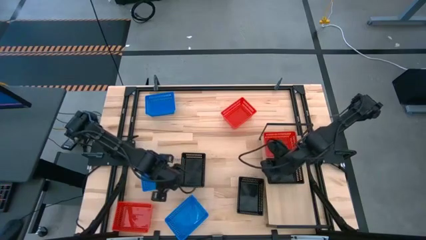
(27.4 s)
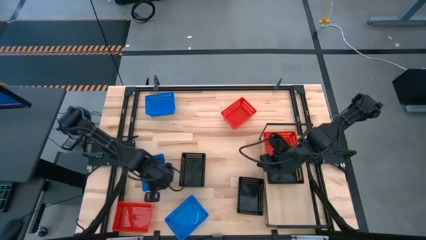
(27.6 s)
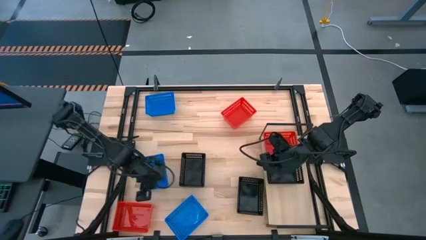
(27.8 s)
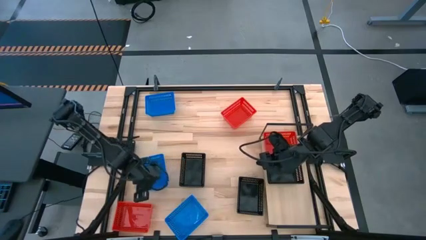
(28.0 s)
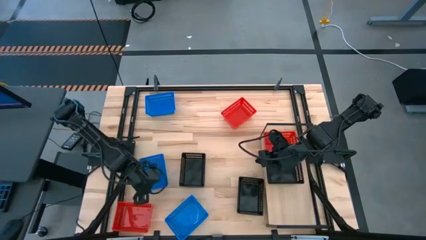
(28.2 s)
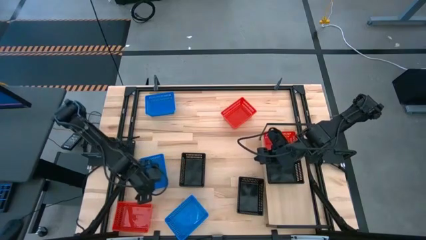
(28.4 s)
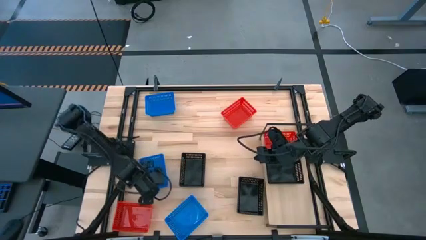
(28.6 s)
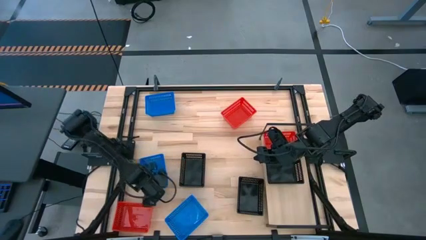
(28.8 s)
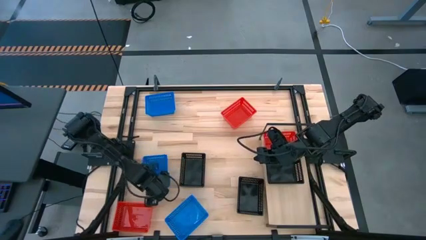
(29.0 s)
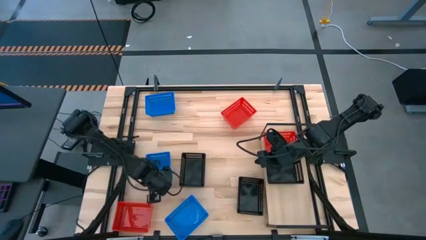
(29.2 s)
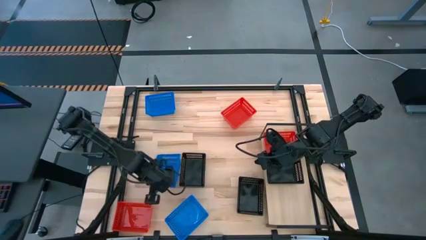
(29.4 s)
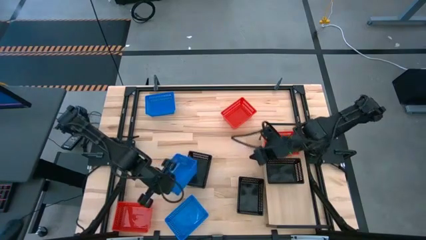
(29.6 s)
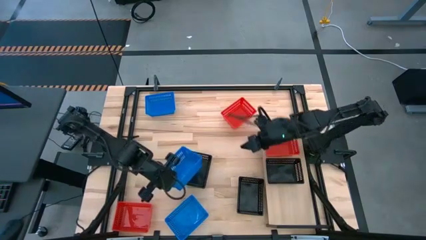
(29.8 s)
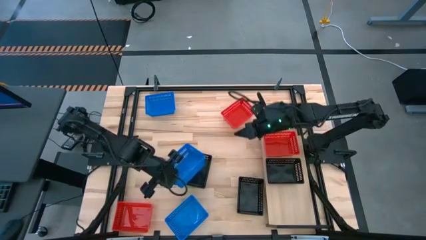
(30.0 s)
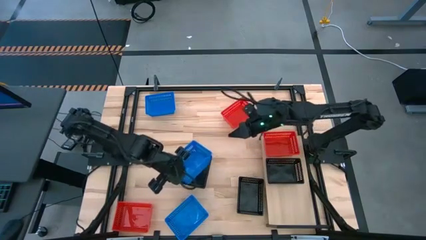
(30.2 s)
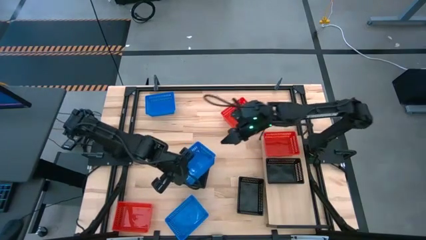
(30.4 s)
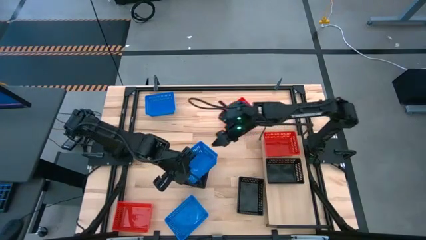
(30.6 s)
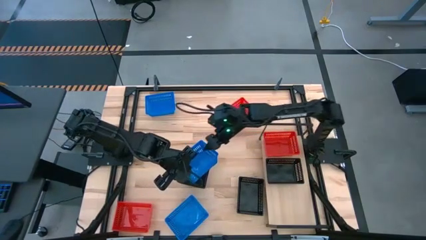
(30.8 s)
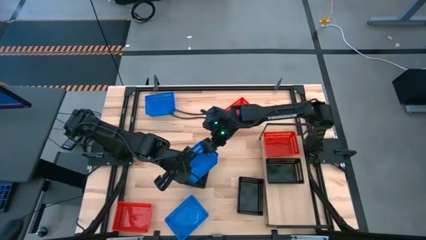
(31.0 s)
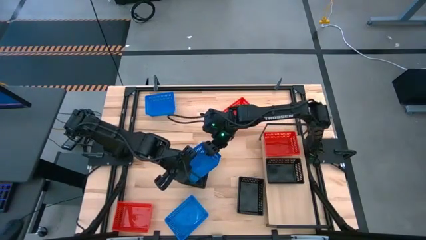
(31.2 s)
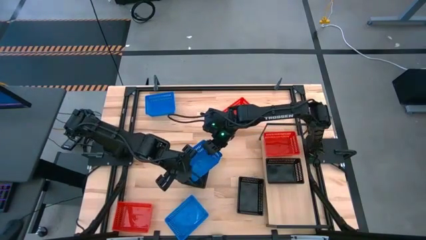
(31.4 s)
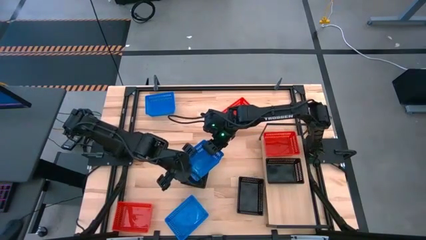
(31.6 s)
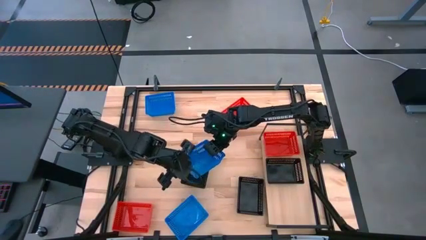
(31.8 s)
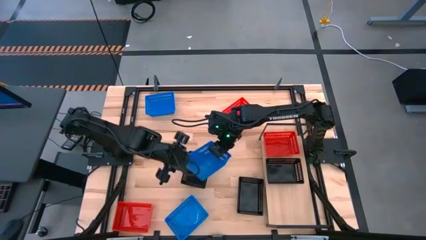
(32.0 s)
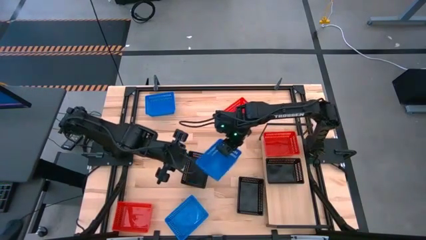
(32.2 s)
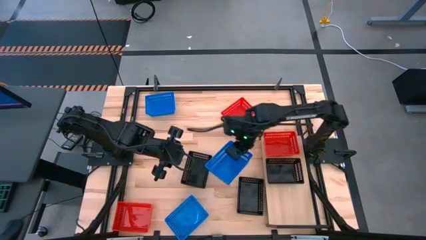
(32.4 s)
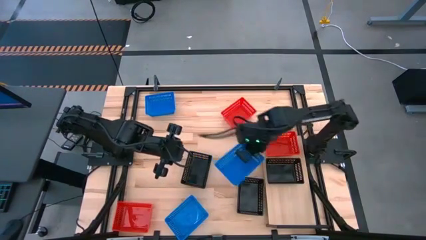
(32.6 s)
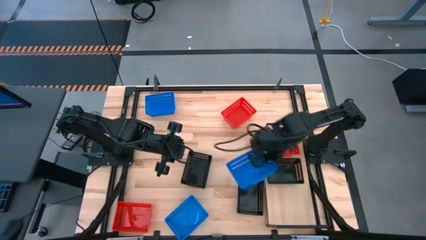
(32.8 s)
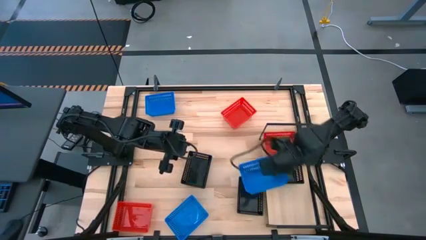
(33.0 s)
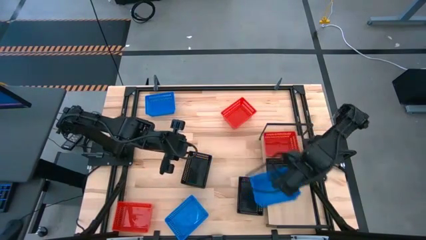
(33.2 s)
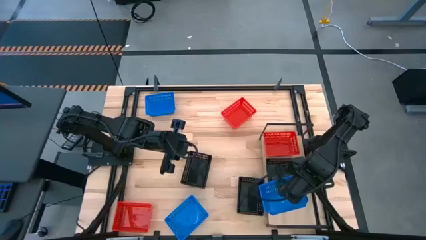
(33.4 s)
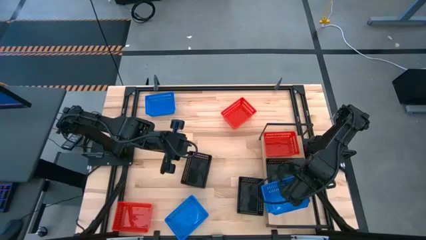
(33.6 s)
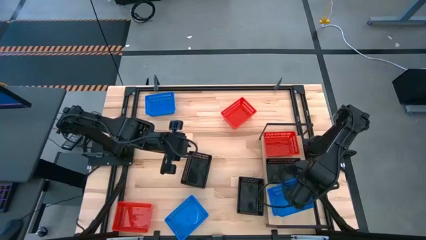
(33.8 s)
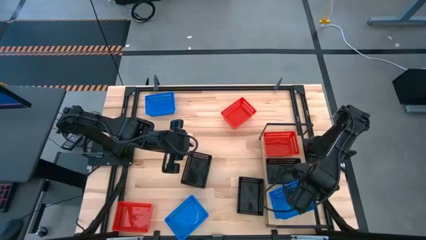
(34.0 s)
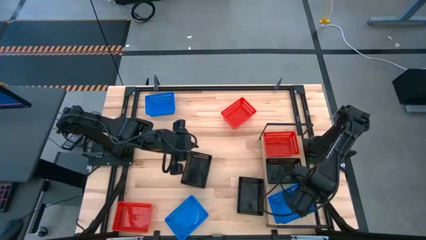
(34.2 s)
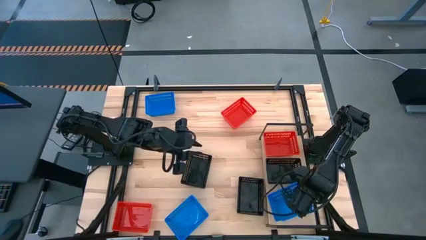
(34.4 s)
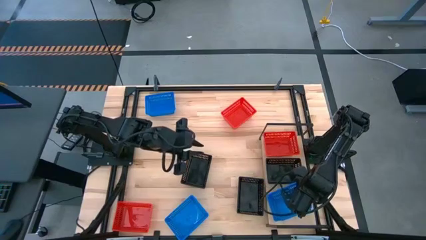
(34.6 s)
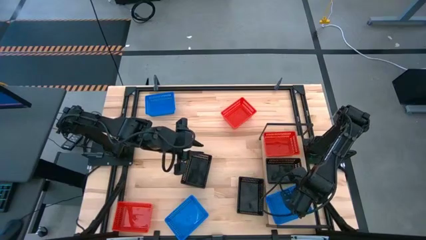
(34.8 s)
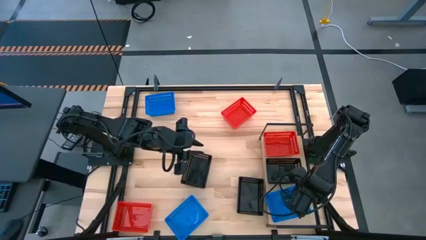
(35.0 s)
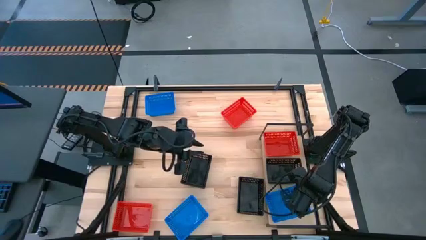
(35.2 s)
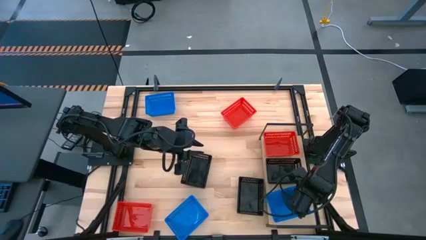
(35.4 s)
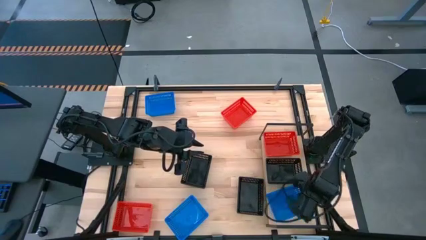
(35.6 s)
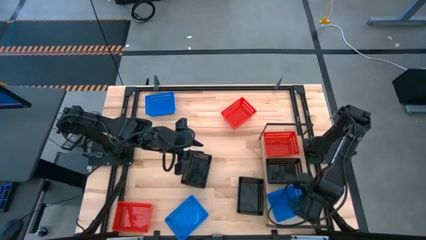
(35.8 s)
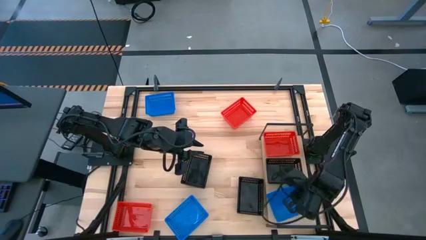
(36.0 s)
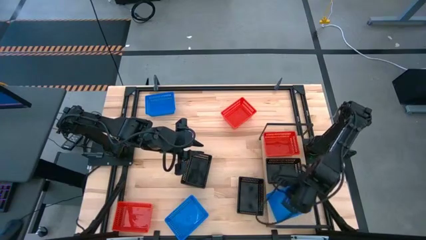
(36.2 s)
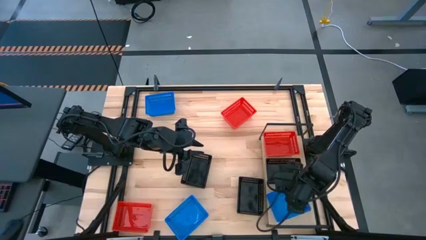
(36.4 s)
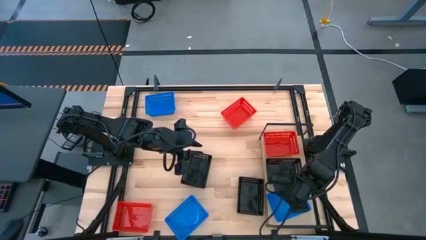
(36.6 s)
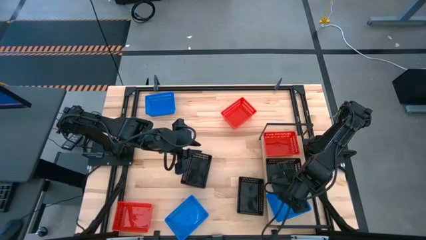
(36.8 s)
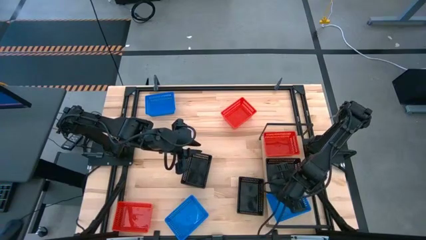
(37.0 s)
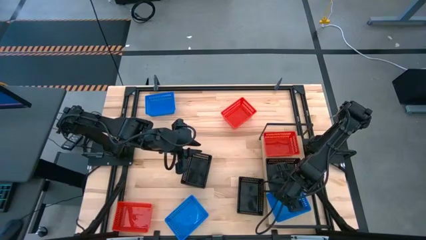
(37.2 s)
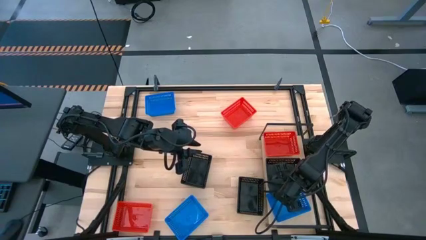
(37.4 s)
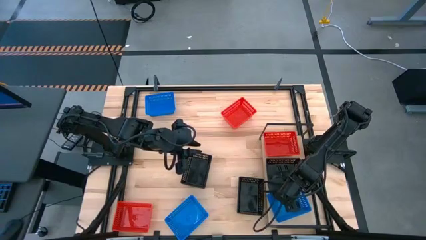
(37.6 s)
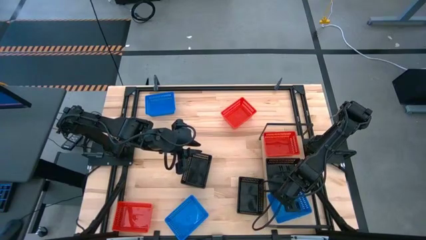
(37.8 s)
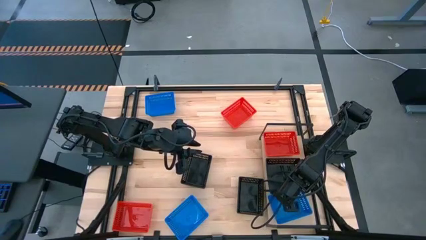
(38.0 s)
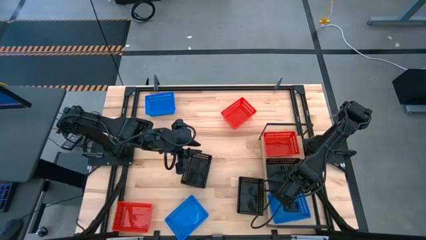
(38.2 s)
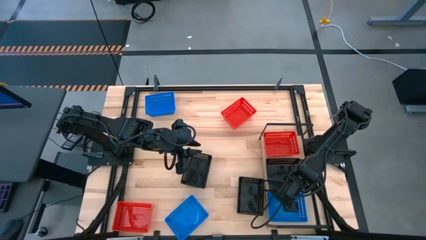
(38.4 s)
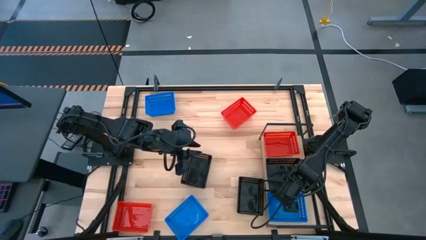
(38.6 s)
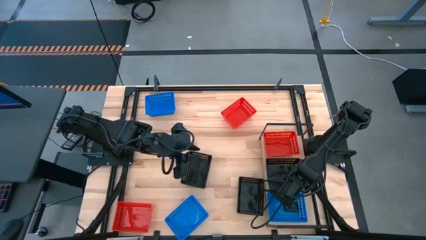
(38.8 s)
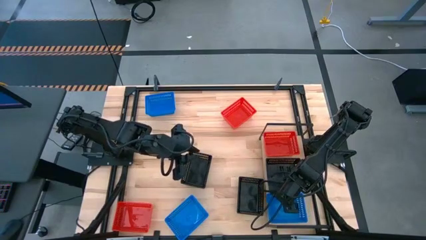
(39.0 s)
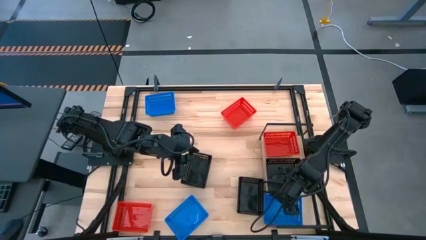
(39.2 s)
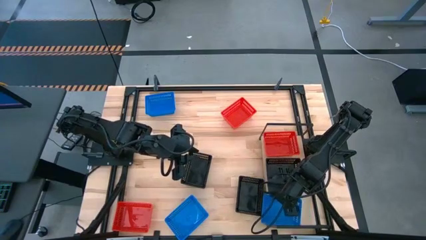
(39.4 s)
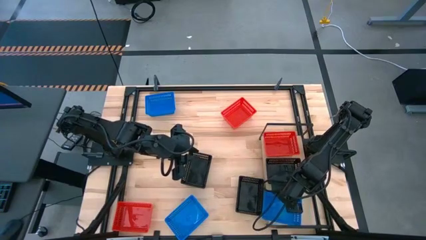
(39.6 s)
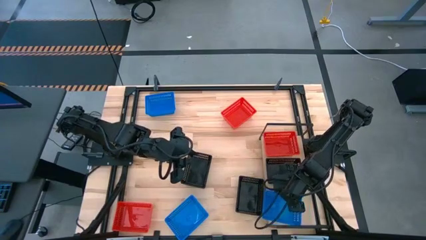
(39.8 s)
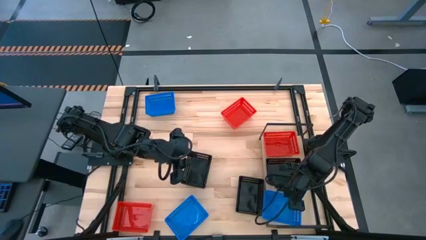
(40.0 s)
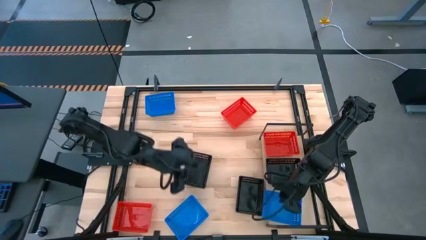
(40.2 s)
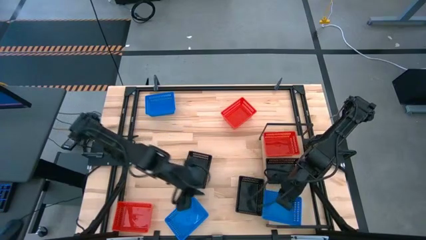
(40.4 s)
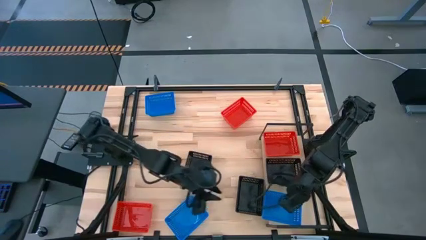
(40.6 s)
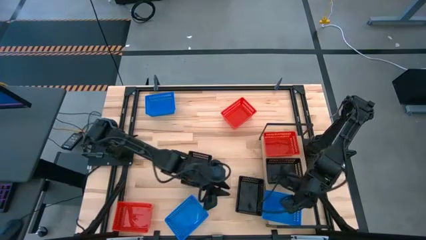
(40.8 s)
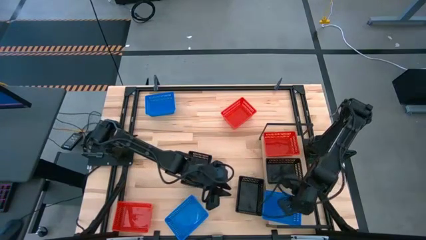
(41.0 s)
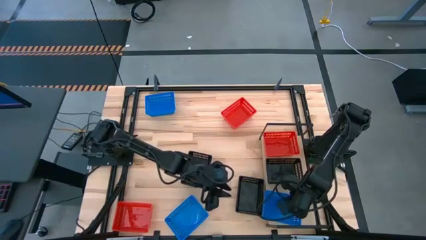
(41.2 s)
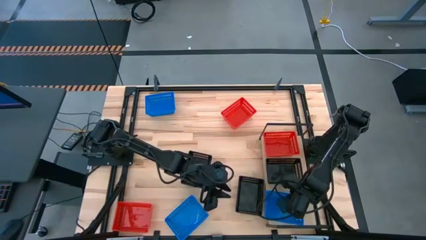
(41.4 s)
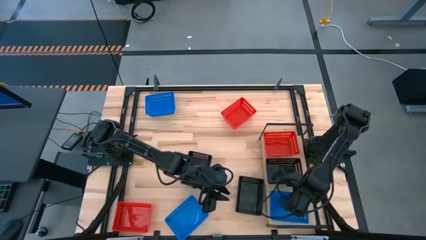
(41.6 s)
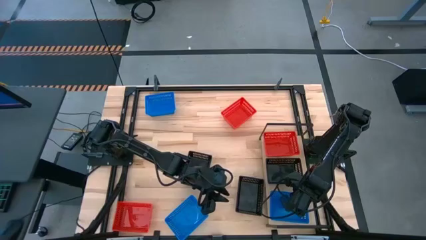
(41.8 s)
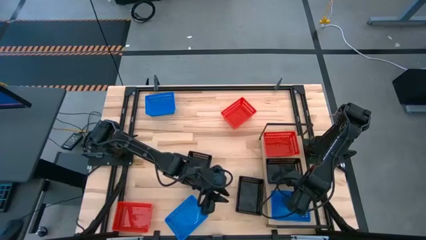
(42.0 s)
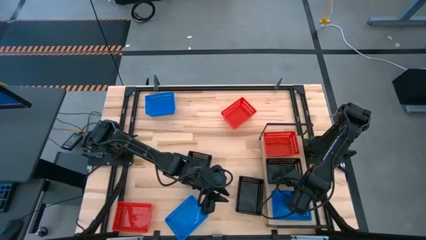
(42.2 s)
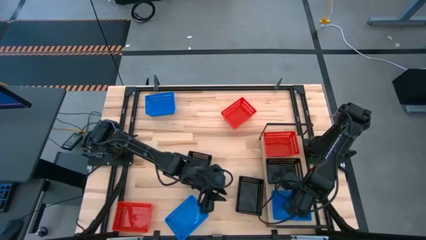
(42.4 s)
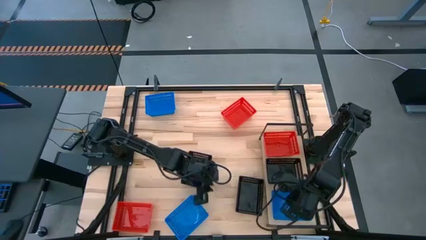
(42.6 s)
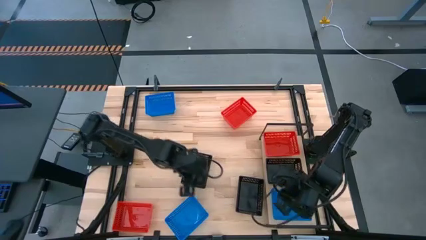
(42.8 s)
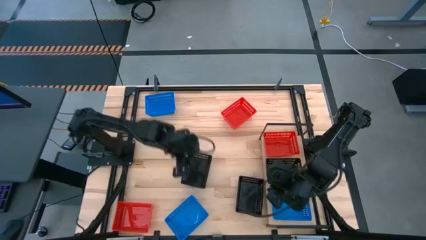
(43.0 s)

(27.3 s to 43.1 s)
Task: Stack baskets on shelf by color
Put the middle blue bin on the shelf

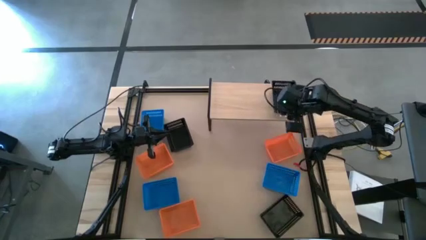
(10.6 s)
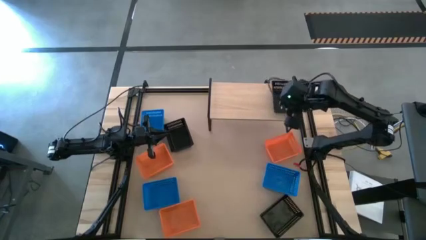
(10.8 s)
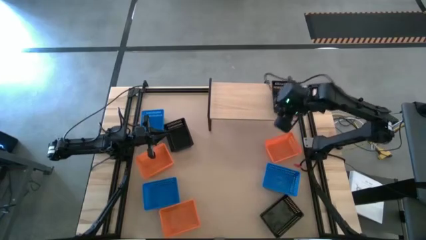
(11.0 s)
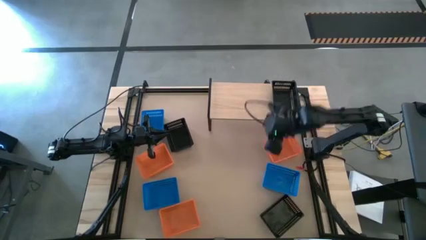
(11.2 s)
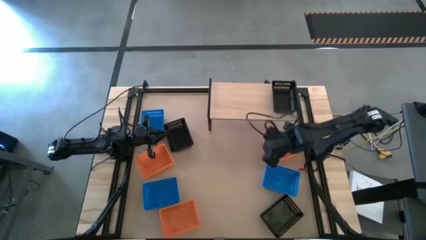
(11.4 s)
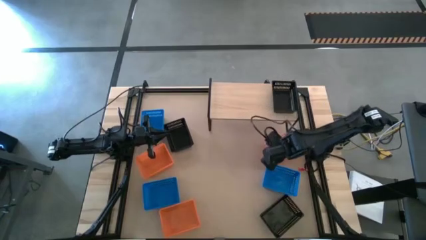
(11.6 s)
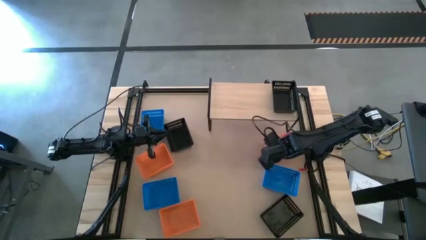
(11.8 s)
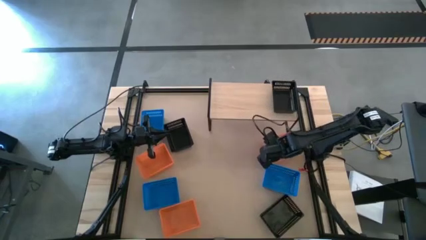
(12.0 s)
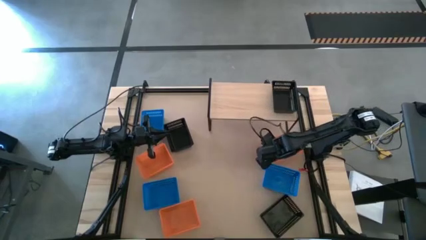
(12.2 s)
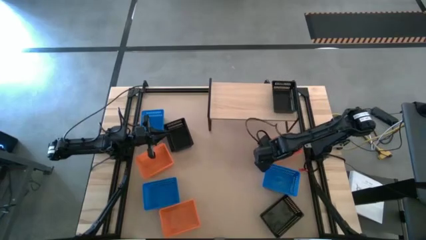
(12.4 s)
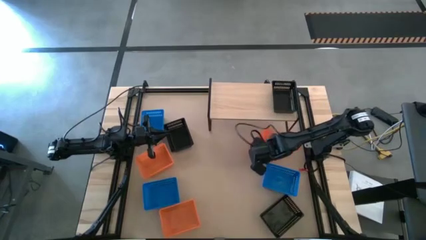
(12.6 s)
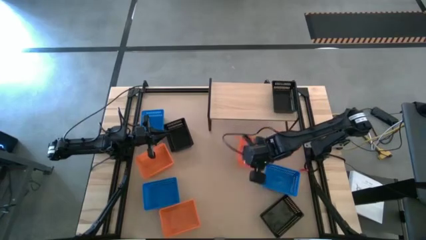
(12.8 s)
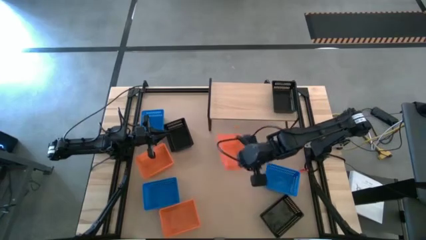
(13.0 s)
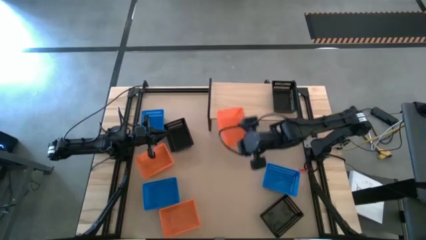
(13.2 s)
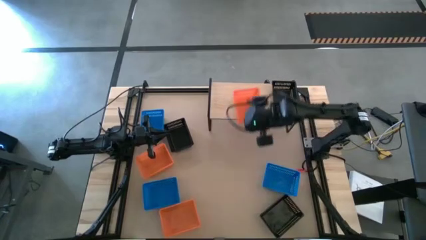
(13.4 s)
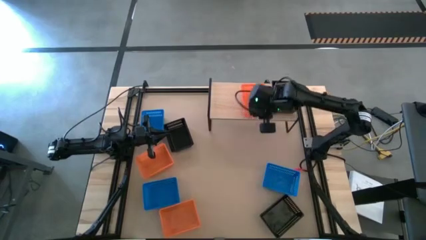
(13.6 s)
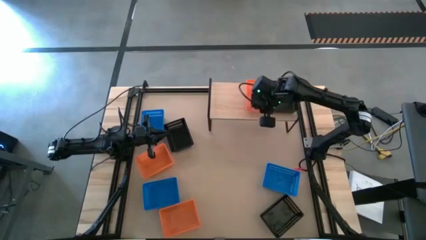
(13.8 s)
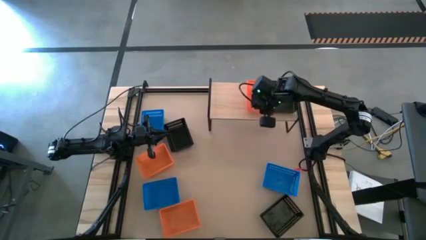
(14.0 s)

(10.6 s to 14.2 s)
Task: Stack baskets on shelf by color
Put the top right orange bin on the shelf
